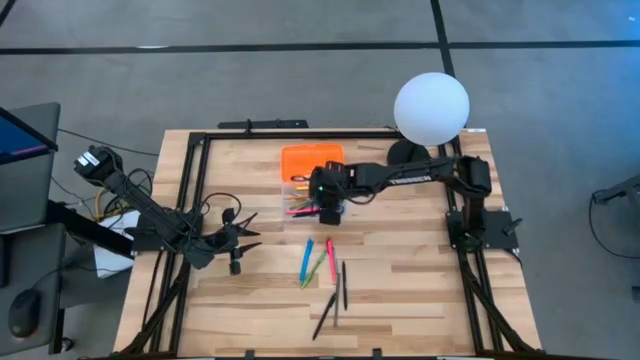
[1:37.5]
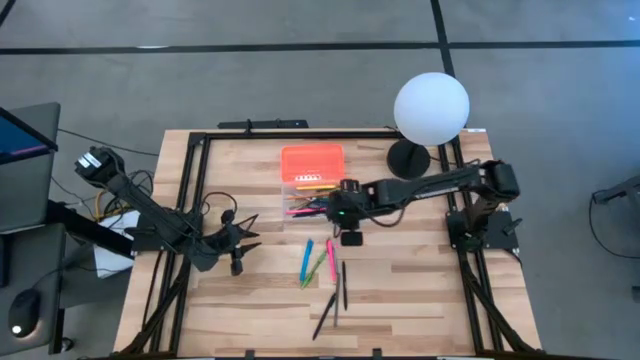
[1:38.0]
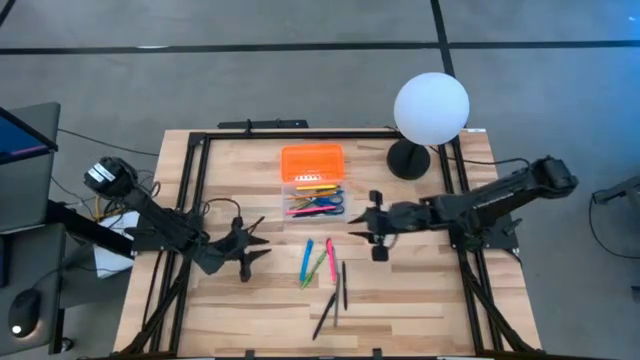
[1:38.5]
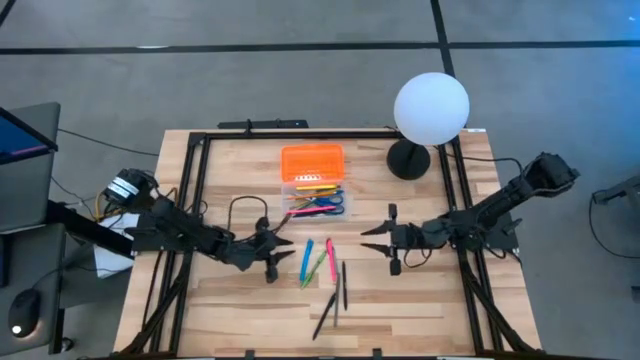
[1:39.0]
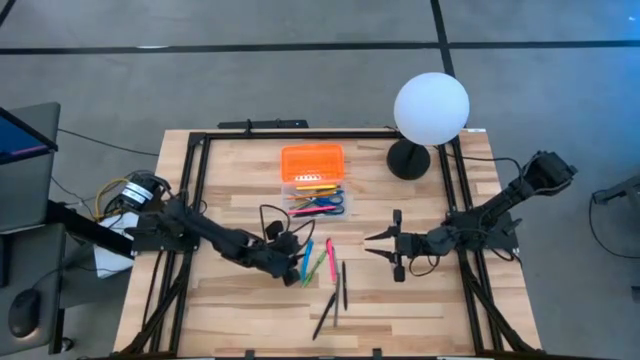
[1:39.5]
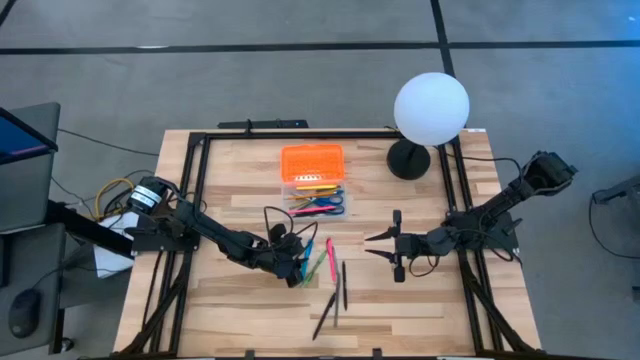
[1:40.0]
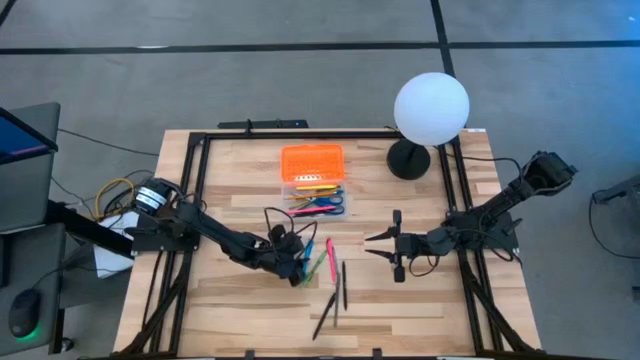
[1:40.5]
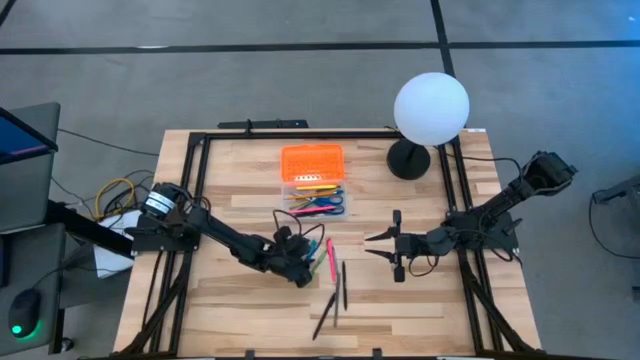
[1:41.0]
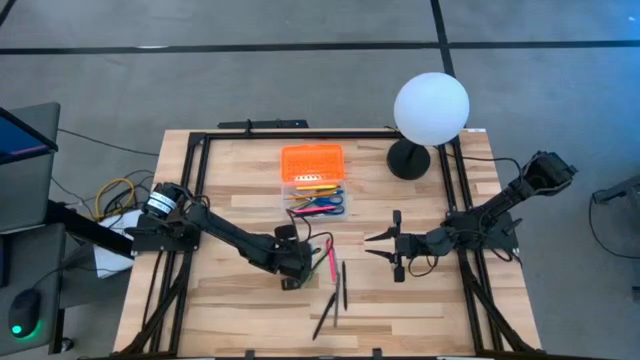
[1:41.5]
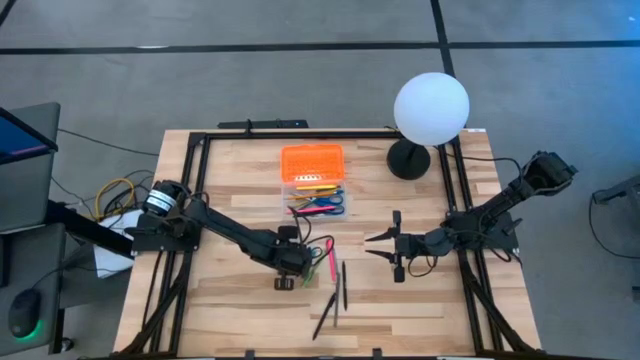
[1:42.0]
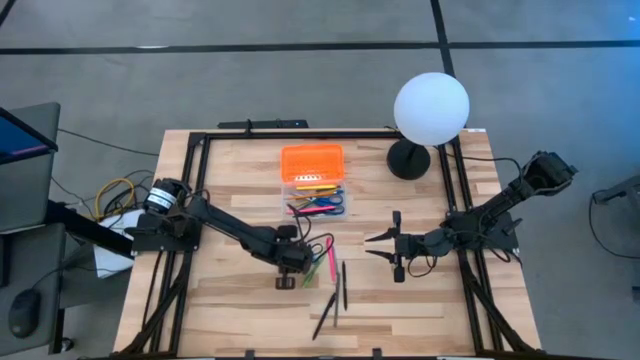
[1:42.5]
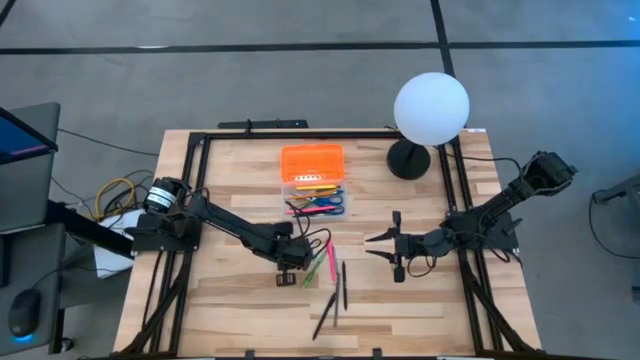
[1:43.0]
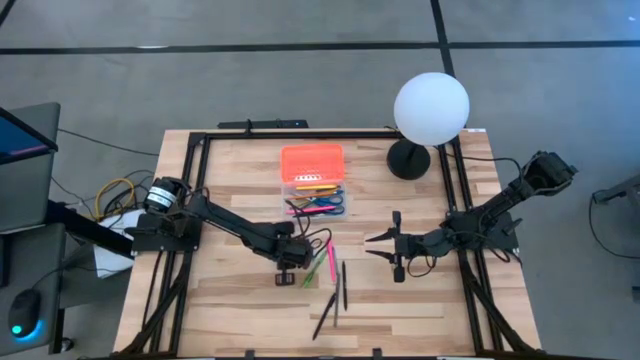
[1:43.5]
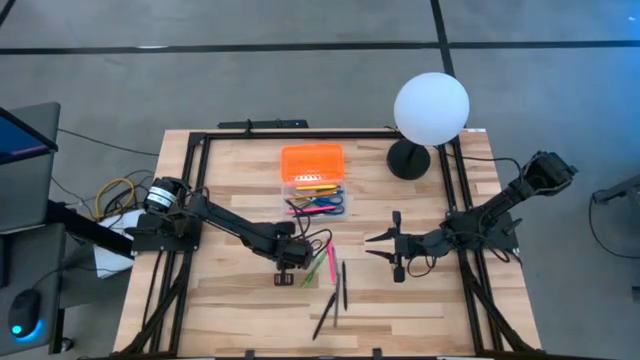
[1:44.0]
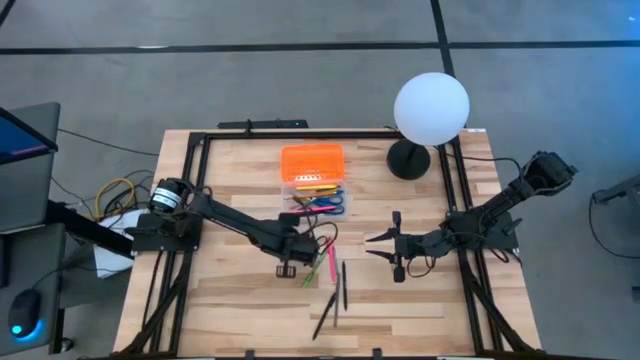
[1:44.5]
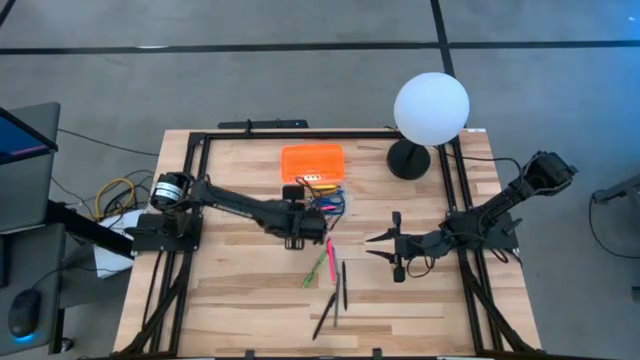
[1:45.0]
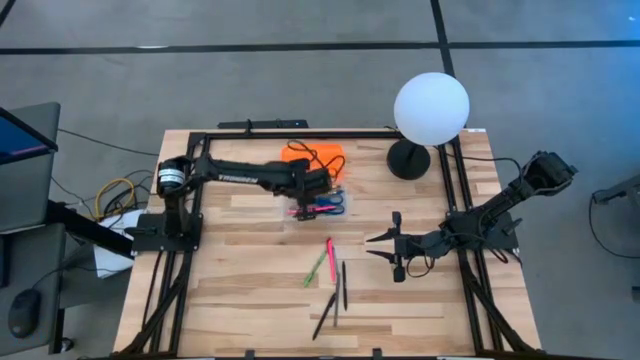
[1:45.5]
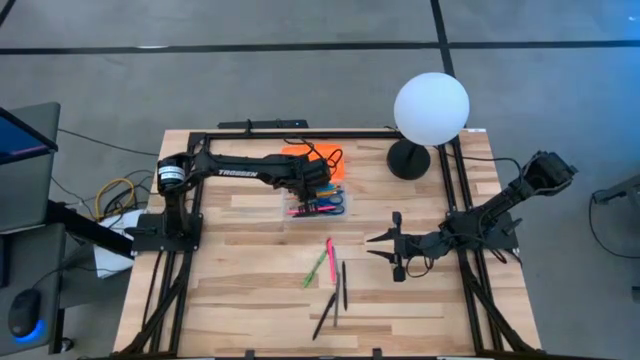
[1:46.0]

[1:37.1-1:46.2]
Task: Pick & place school supplies into a supply box
Put the blue pen into the supply box

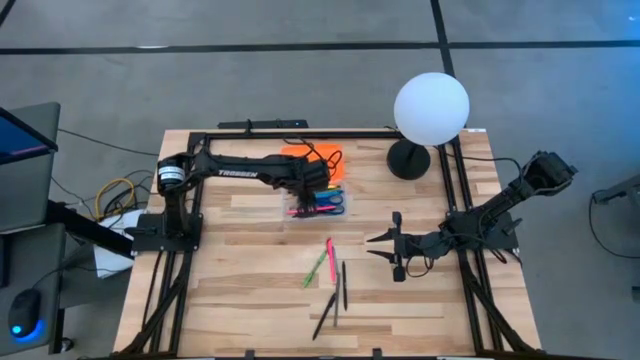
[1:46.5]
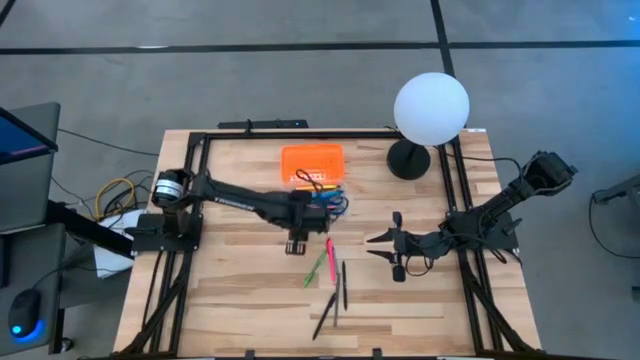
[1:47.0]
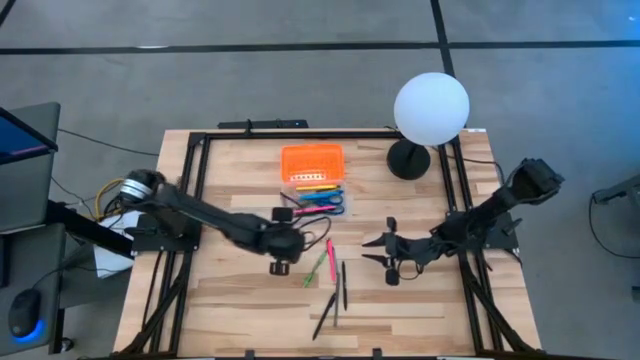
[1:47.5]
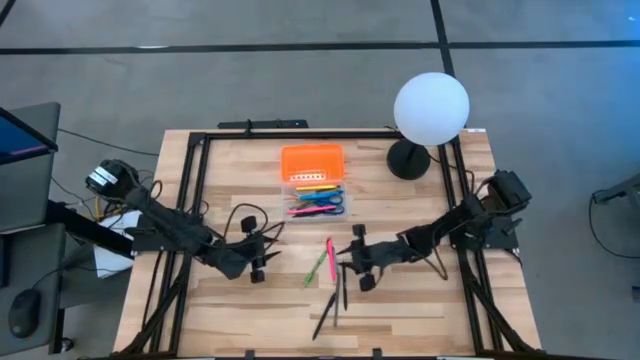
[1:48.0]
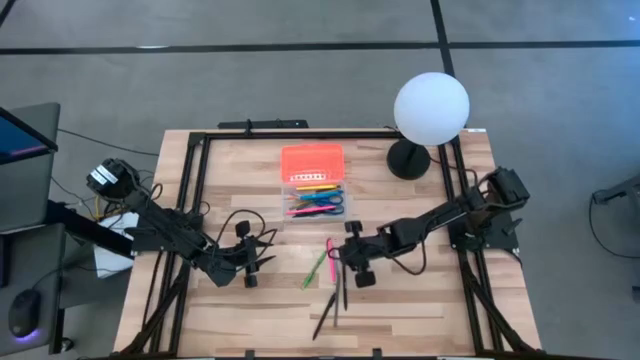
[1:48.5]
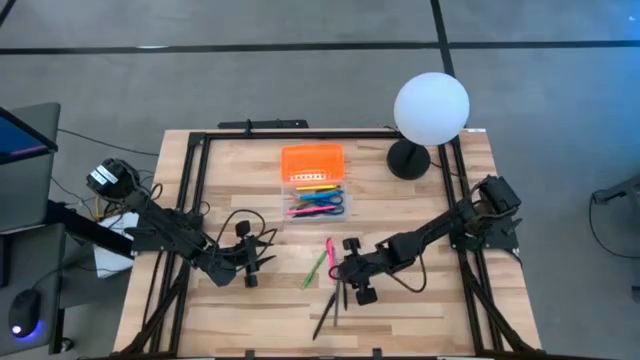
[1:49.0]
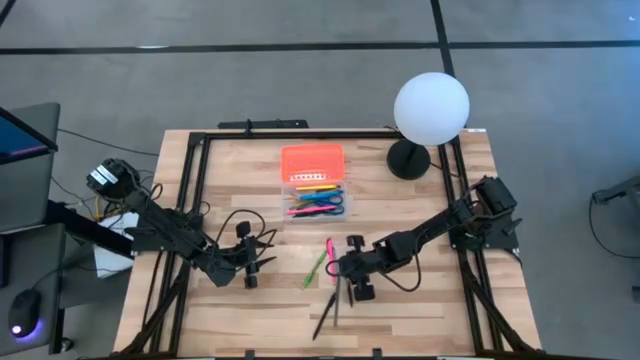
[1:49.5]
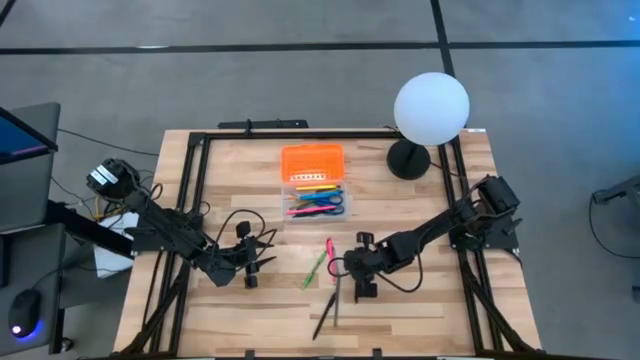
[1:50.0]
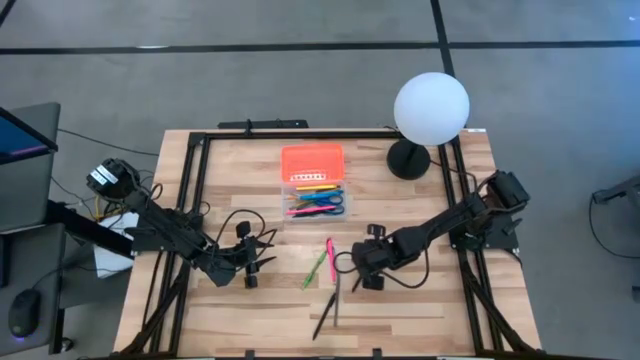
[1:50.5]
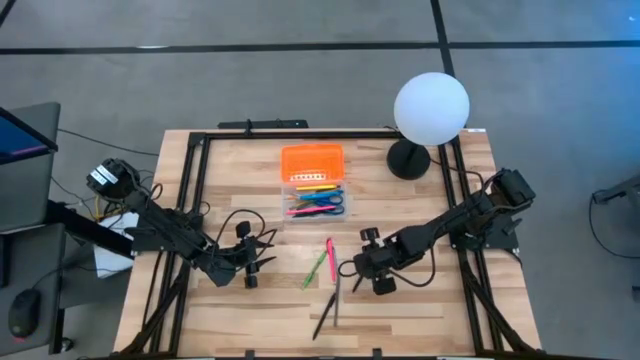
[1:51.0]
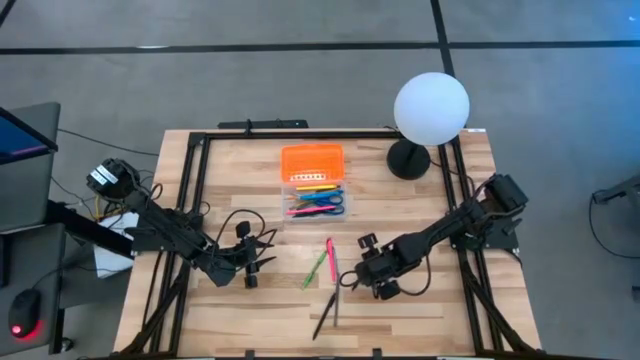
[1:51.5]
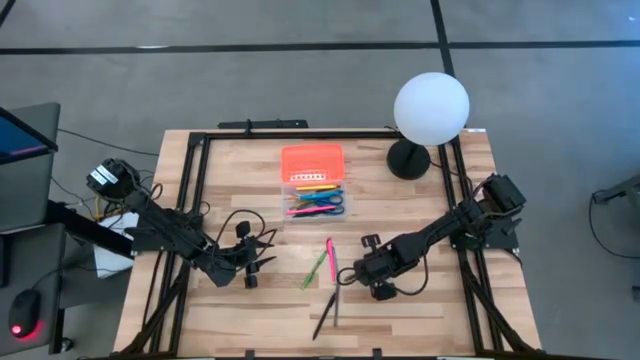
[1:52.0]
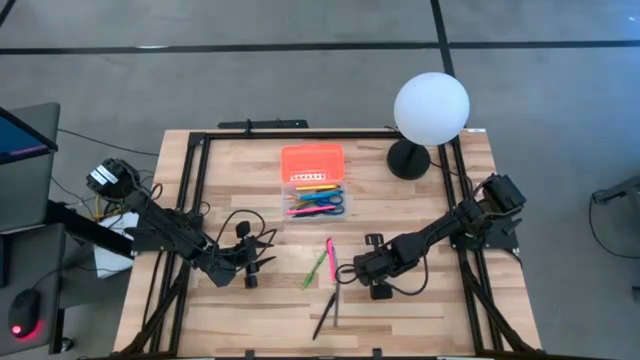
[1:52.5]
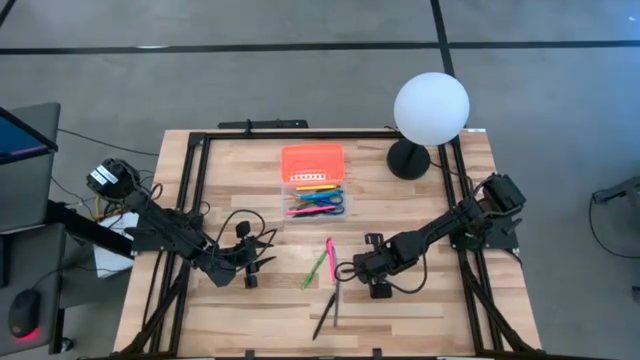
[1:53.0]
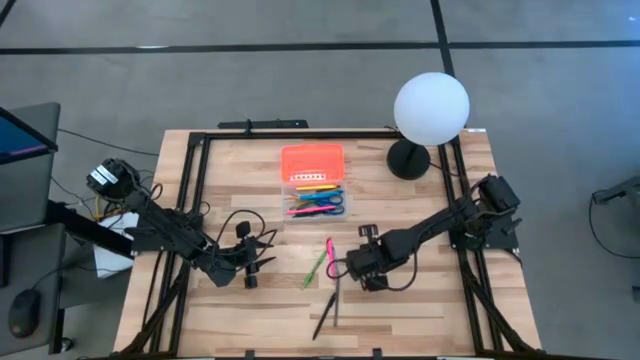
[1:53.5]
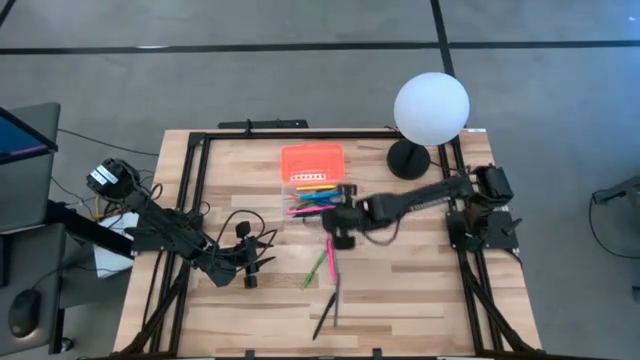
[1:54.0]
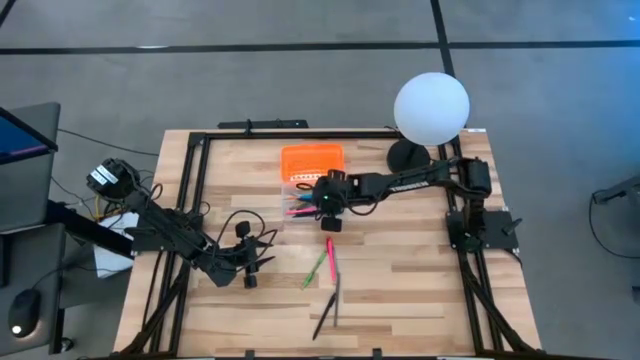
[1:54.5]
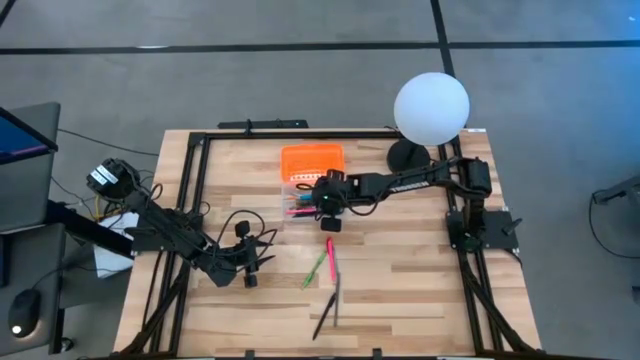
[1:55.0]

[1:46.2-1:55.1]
Put the black pen into the supply box

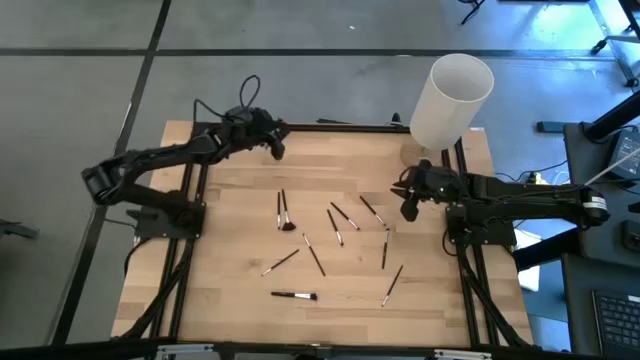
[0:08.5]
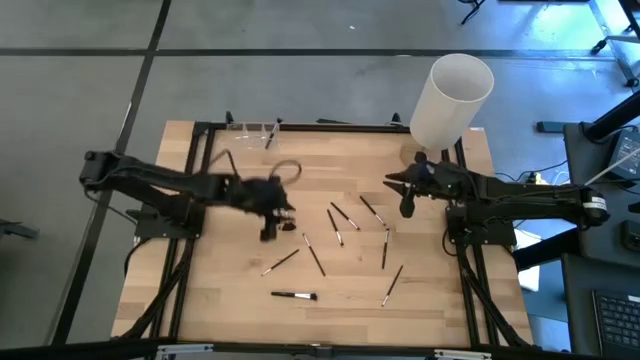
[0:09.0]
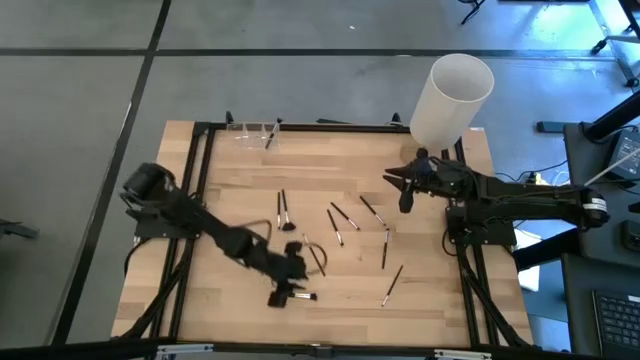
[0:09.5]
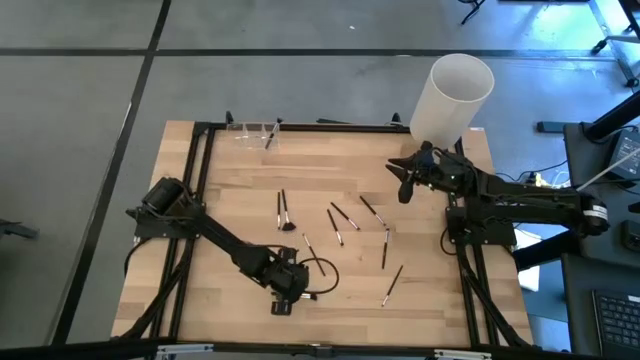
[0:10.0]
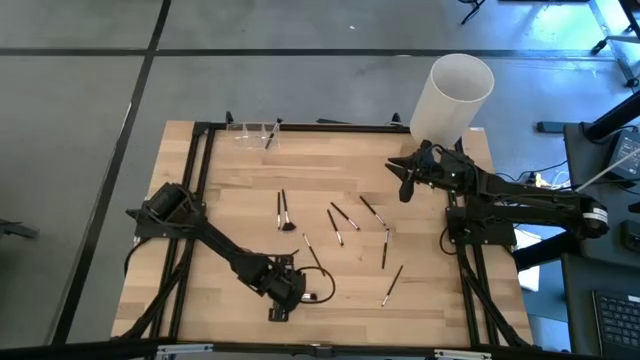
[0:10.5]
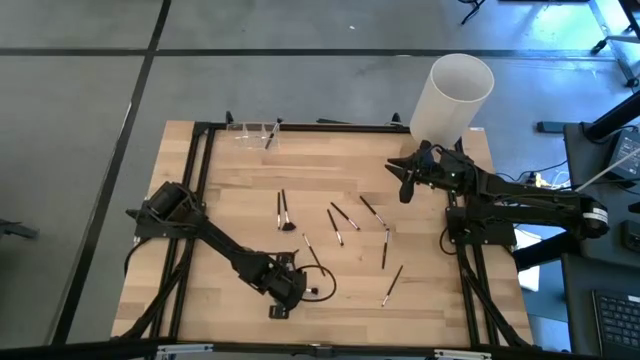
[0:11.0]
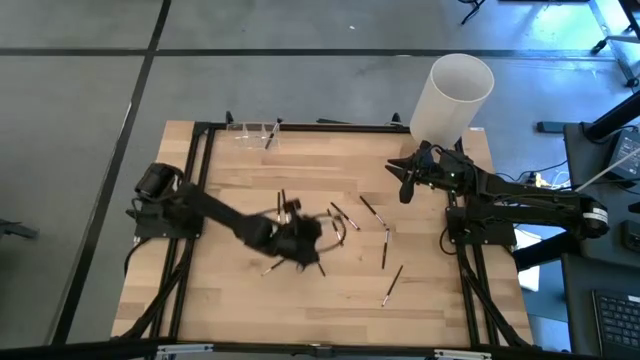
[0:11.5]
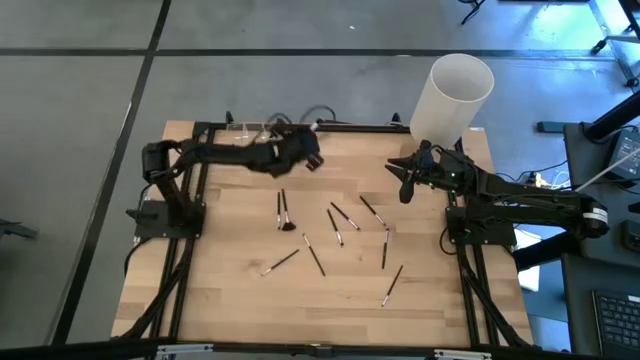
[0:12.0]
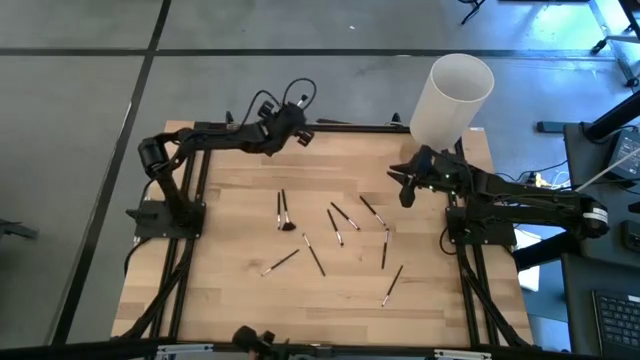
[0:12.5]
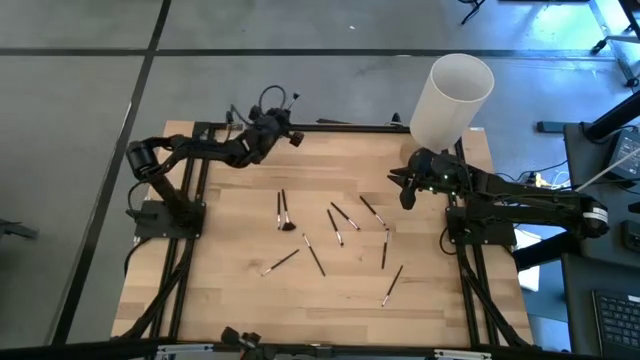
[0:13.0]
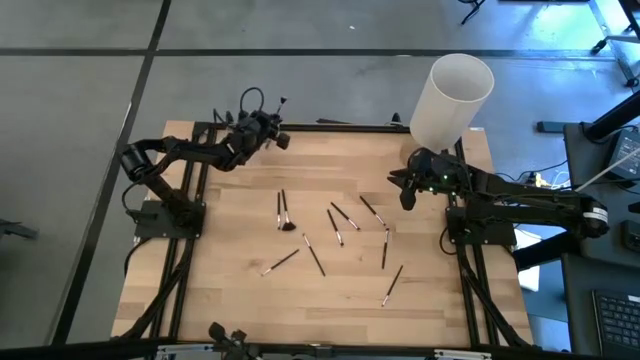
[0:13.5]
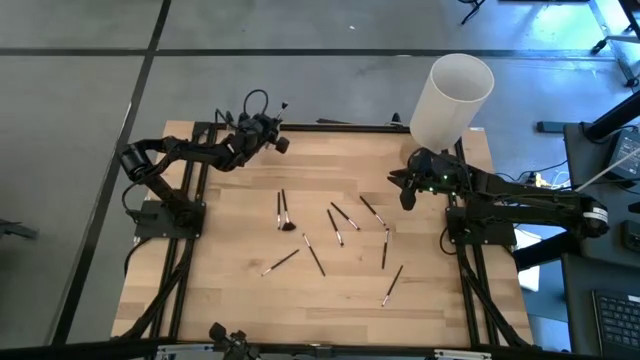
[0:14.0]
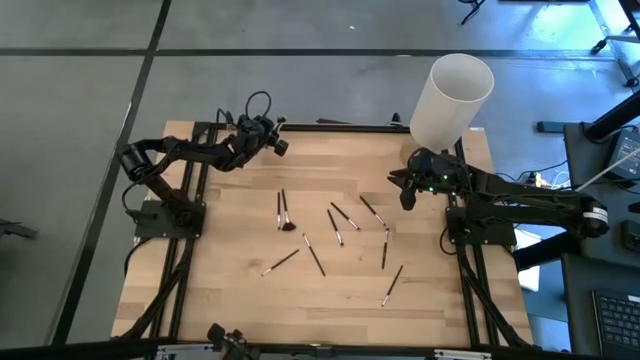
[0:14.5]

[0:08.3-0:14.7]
Task: Put items in baskets/containers
Put the black powder brush into the transparent organizer
